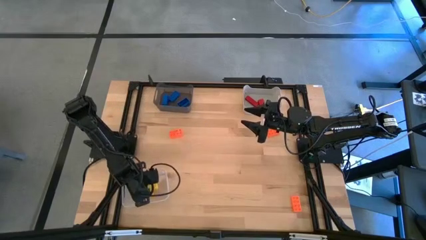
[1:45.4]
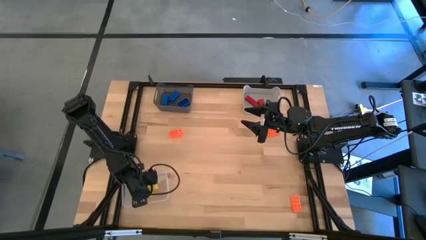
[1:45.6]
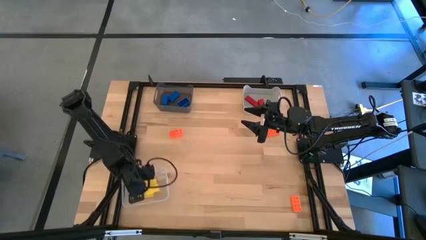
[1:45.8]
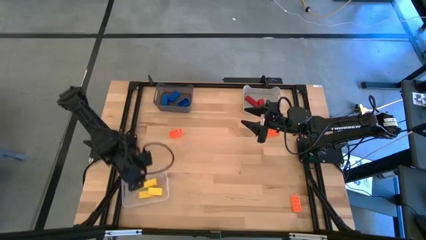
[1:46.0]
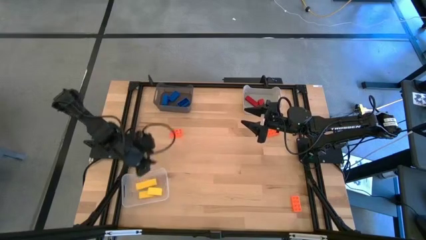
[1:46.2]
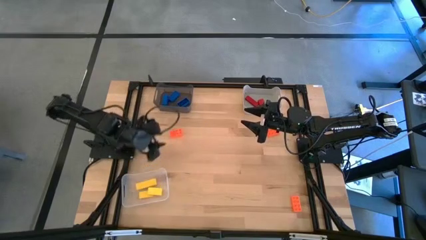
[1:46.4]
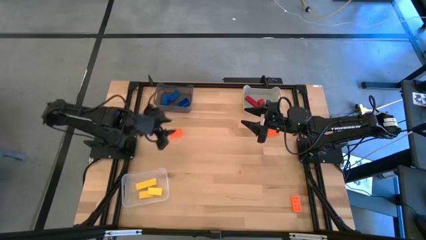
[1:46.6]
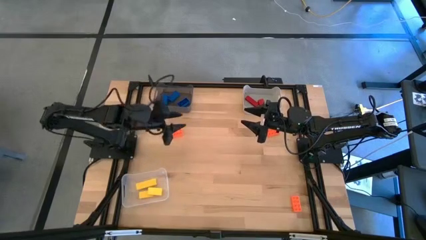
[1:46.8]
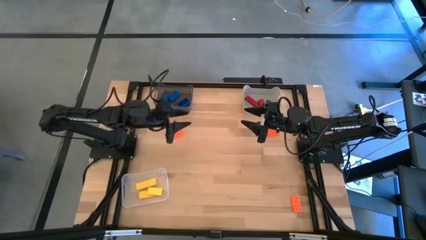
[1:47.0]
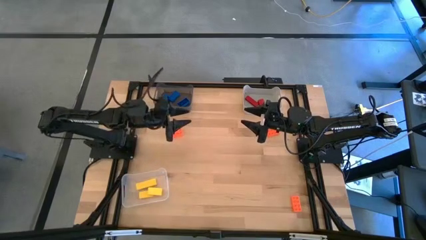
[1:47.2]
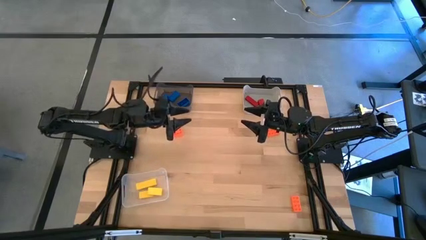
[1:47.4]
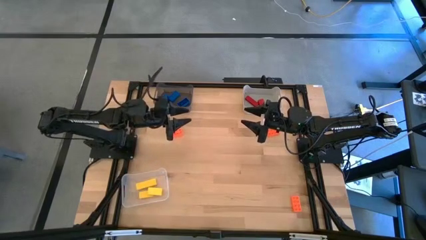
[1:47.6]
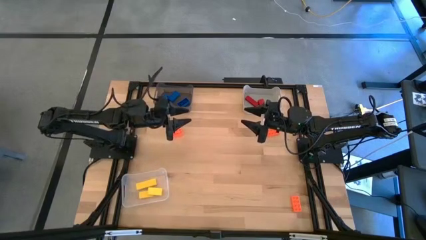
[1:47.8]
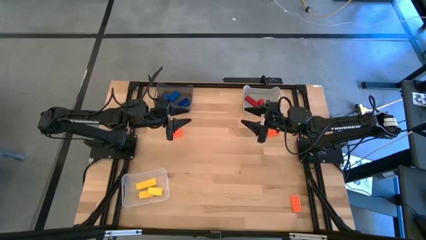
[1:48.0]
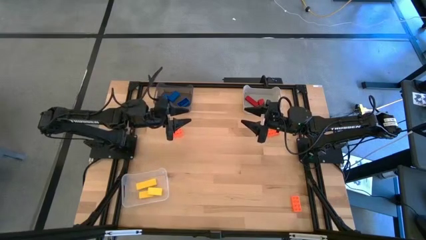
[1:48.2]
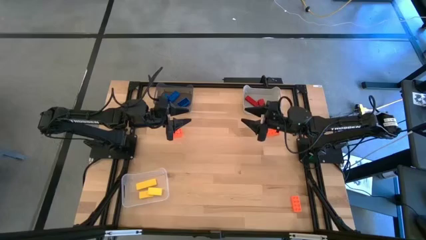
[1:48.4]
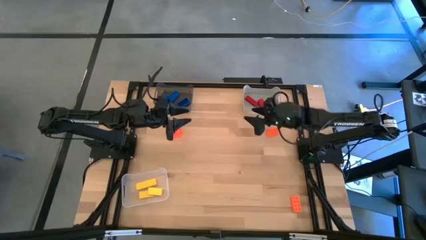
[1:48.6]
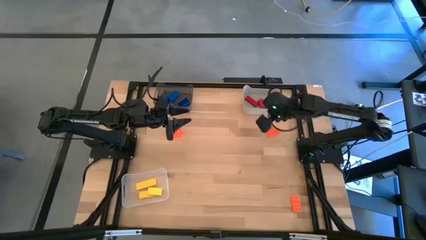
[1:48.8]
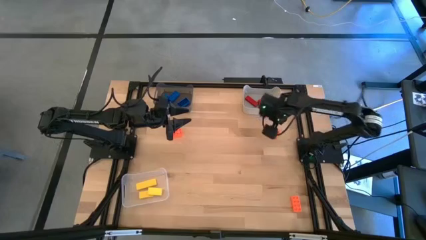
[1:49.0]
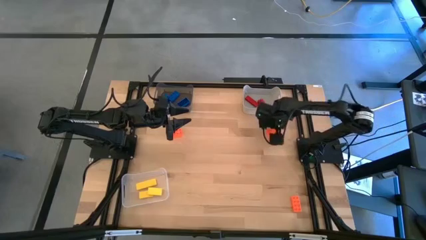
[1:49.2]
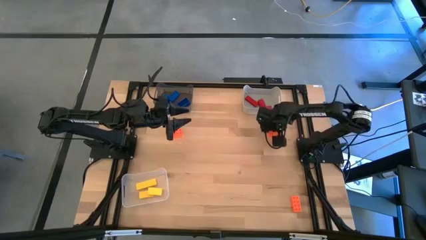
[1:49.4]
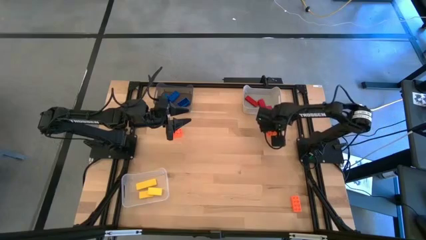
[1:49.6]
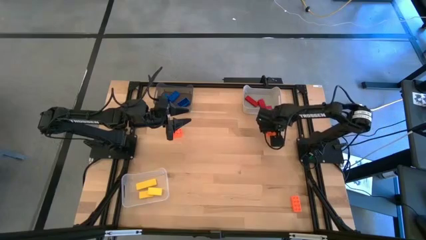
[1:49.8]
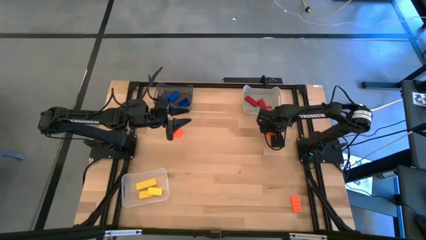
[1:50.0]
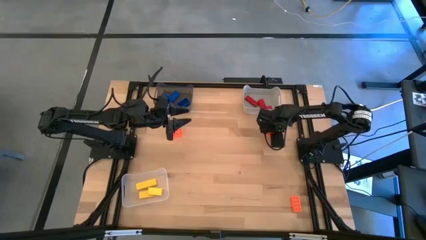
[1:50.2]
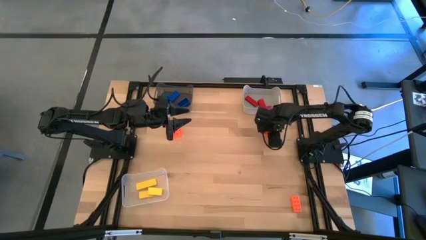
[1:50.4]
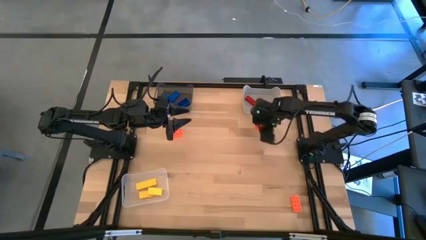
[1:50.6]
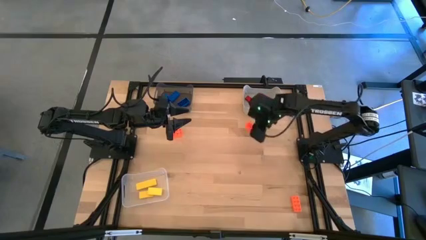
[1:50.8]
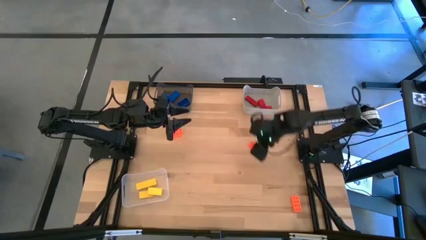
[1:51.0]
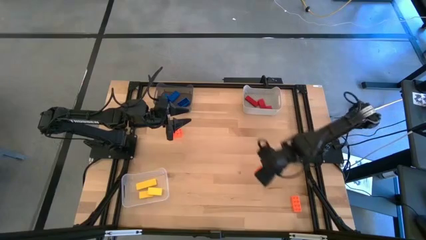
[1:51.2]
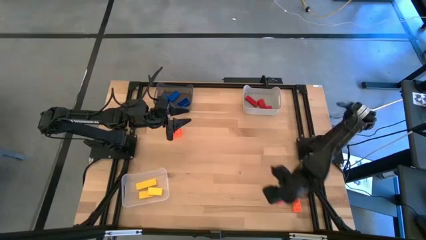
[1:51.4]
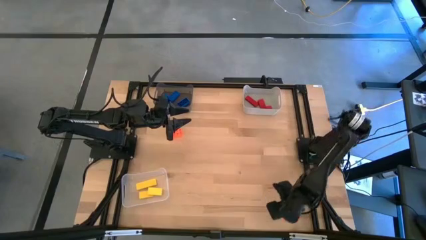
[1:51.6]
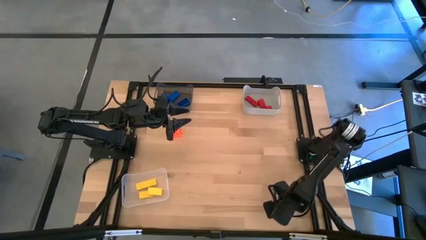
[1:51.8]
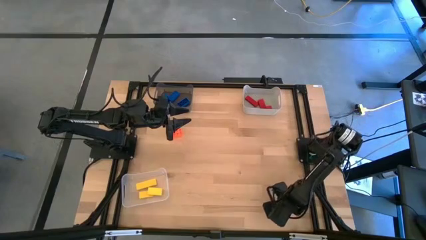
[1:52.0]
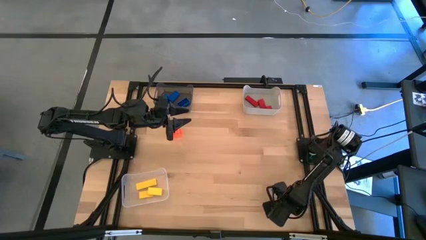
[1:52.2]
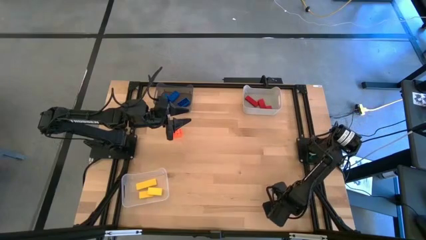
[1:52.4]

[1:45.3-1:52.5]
Task: Sort & place blocks by color
Move the top right orange three stud game piece into the bottom right

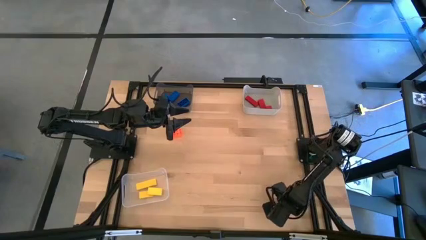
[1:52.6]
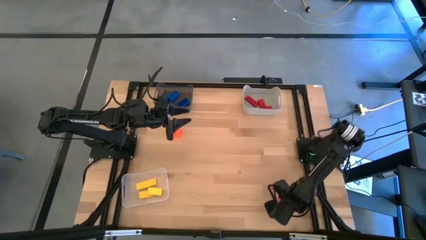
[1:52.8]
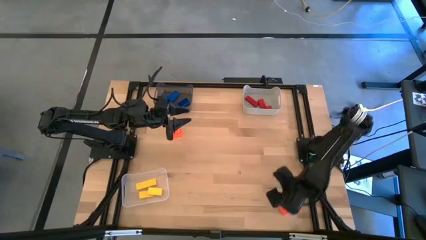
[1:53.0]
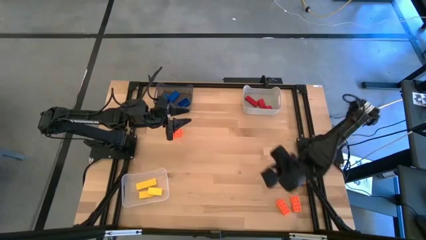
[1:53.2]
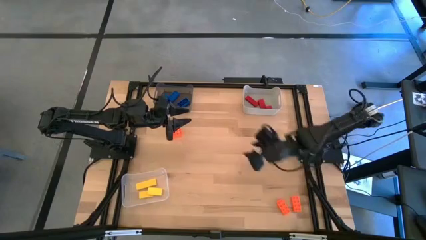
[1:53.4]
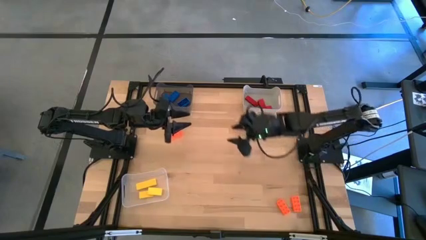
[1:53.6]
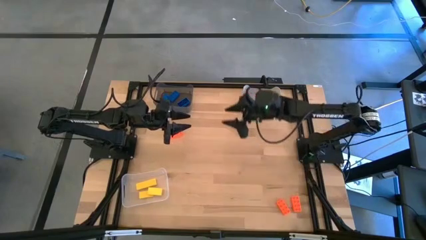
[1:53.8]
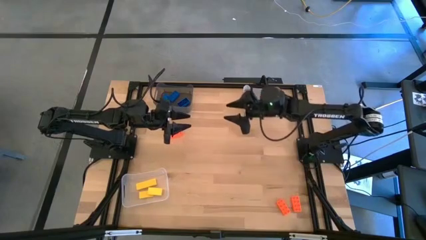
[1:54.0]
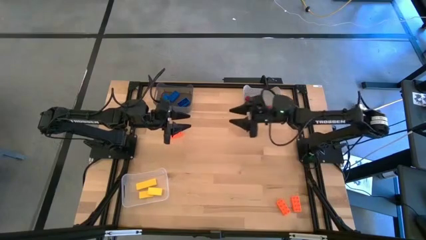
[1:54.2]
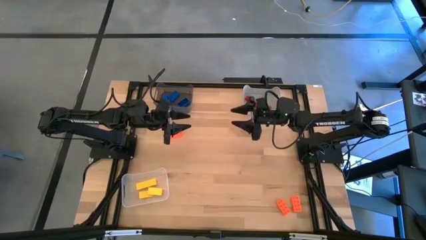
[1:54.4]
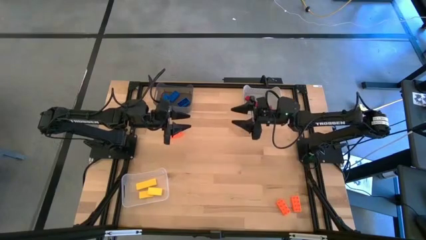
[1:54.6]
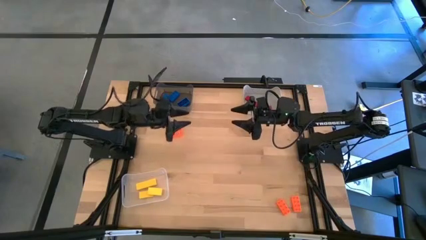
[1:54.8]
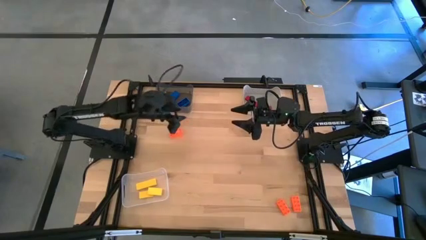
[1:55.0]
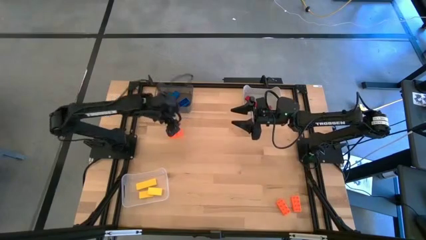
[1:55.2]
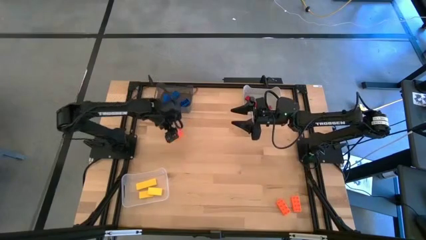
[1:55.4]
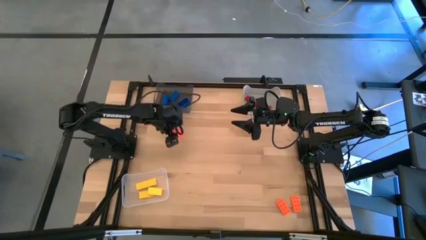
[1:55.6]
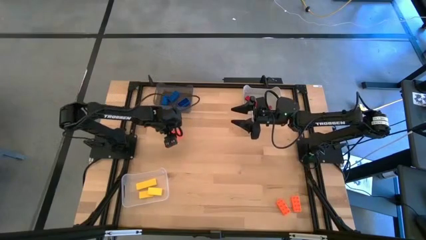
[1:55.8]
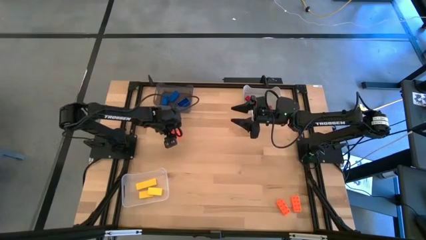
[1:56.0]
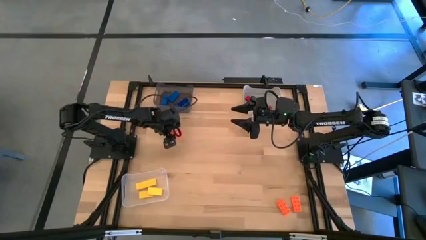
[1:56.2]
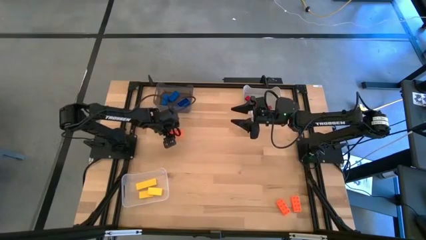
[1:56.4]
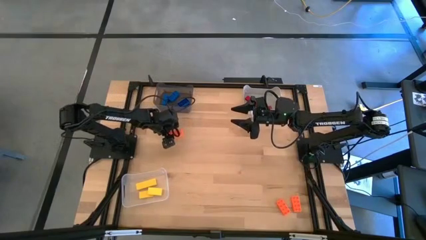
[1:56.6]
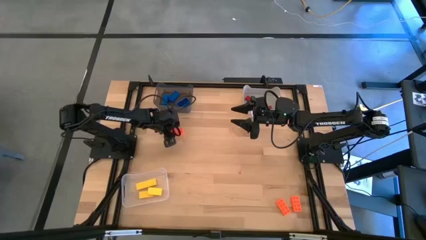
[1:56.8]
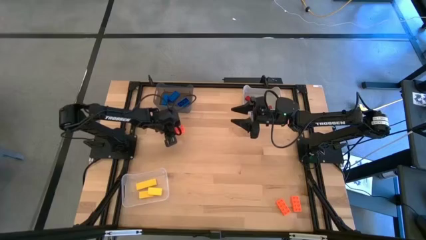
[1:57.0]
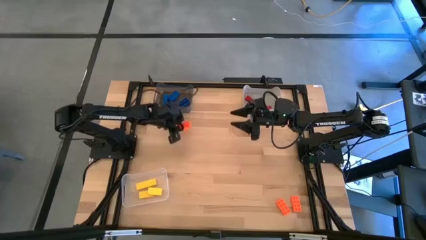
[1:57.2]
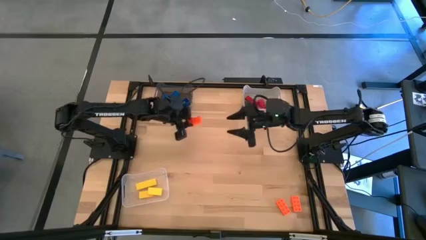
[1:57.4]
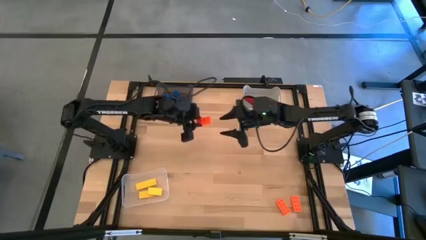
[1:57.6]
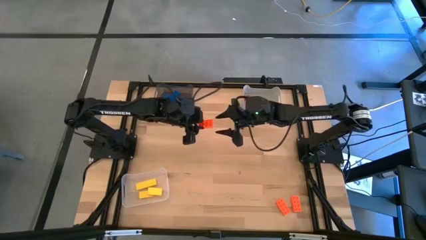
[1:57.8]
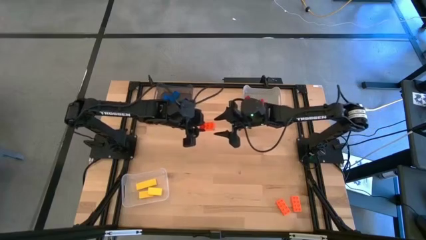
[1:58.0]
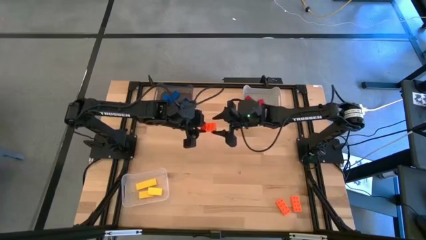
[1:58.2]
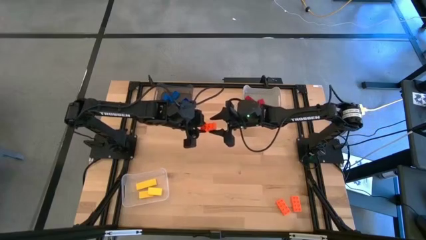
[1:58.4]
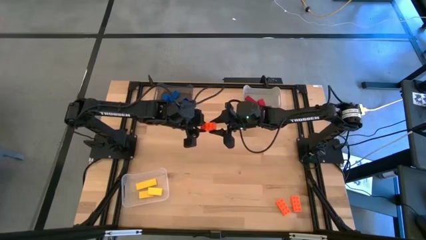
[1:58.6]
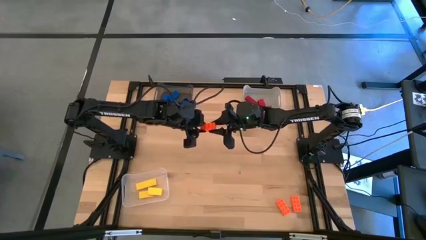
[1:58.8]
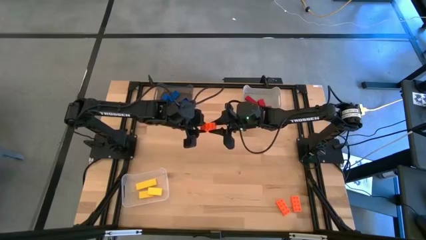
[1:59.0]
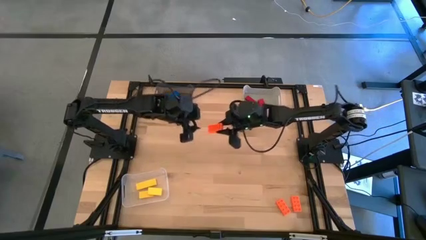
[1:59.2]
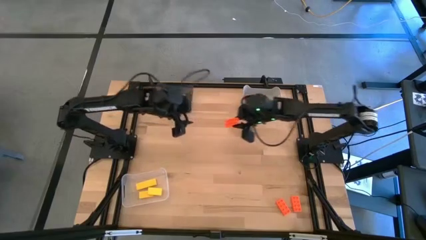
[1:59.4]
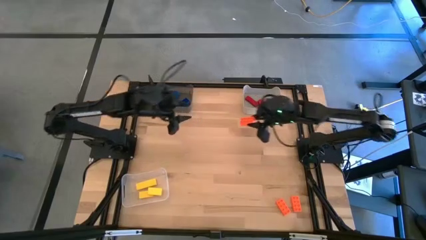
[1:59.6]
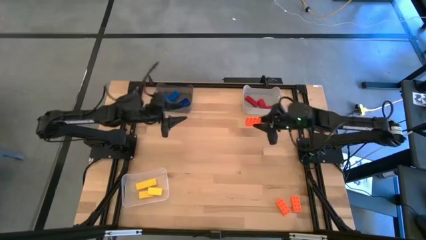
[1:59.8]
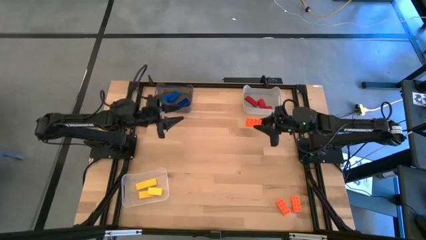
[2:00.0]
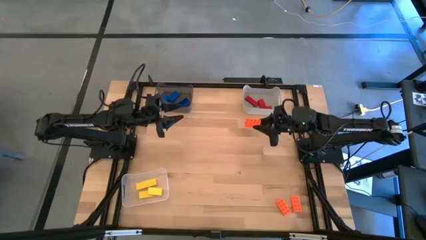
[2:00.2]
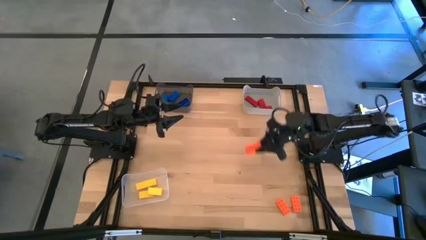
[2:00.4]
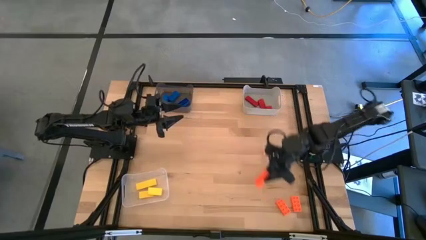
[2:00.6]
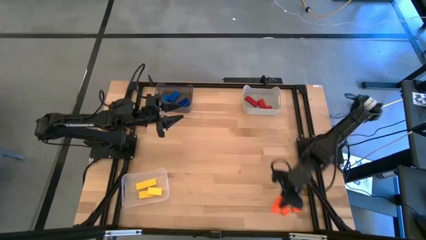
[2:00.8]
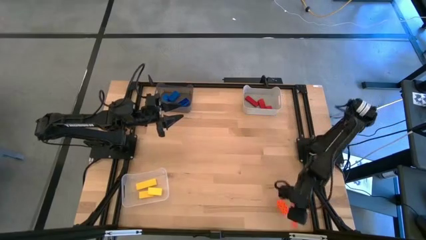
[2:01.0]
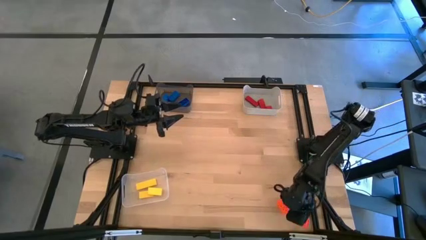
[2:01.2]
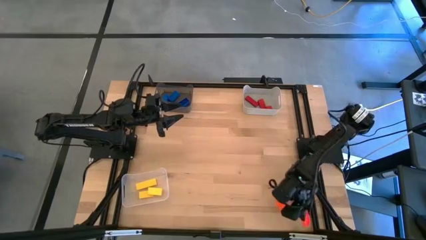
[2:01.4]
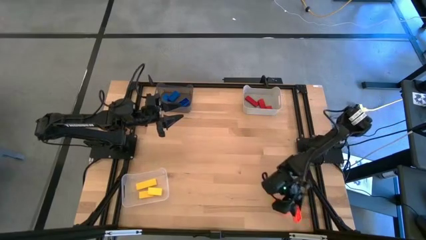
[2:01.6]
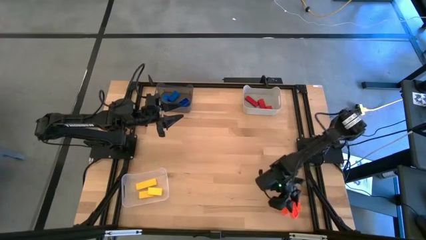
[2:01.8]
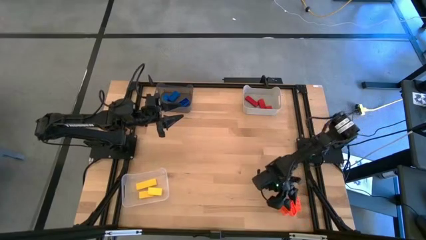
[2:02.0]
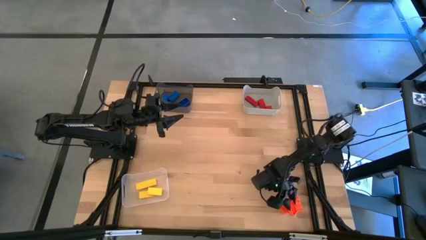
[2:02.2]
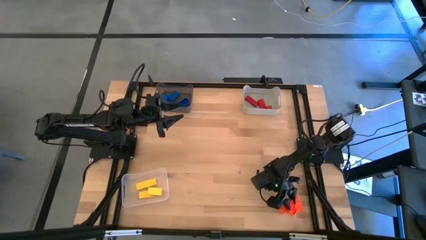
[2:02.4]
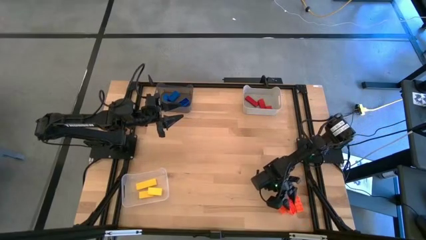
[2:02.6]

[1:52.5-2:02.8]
Move the top orange three stud game piece into the bottom right
